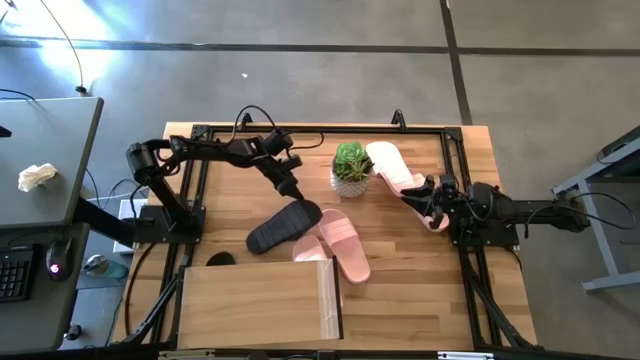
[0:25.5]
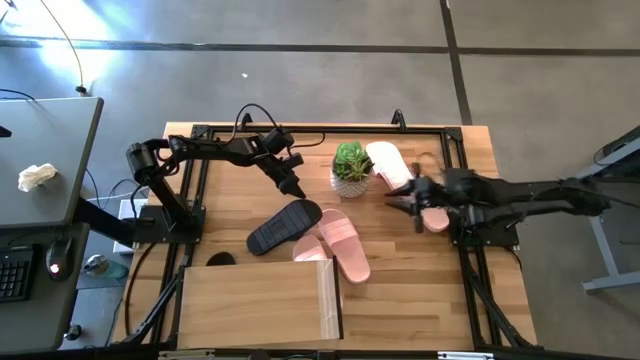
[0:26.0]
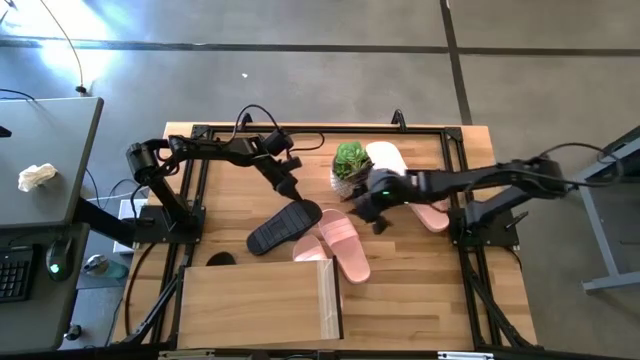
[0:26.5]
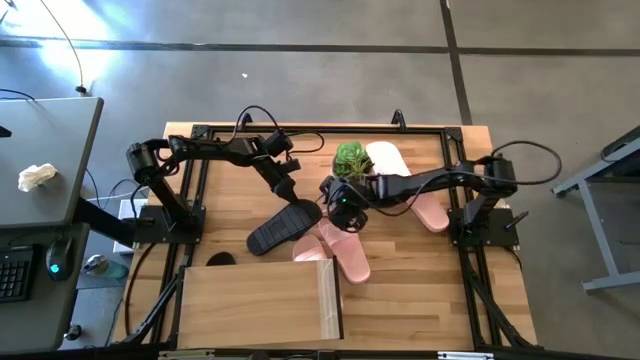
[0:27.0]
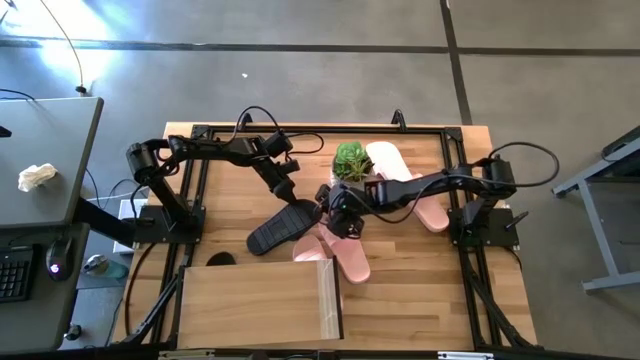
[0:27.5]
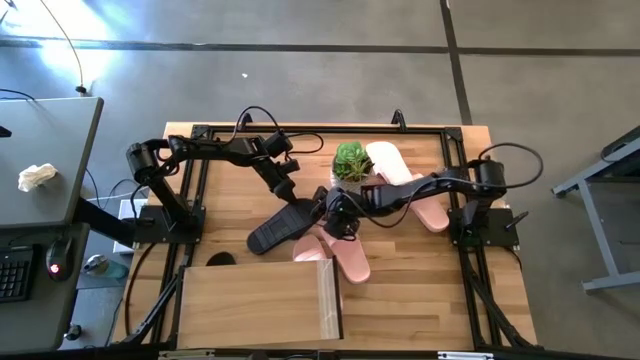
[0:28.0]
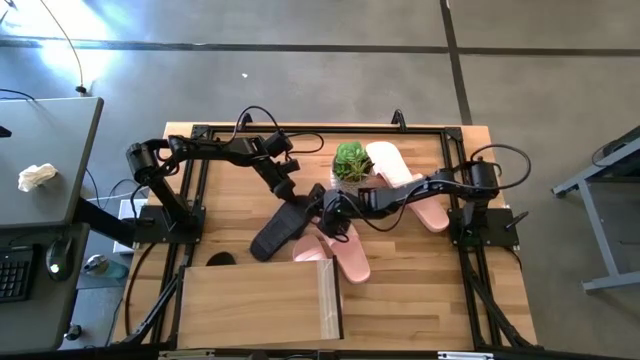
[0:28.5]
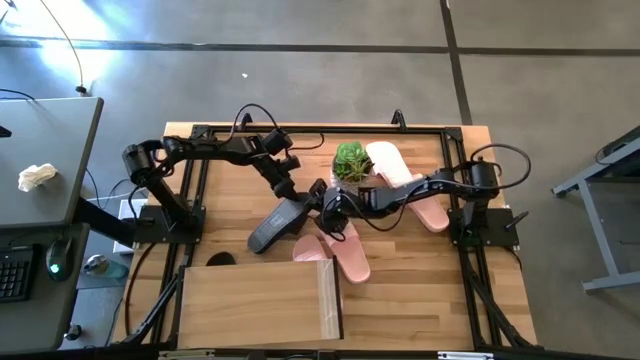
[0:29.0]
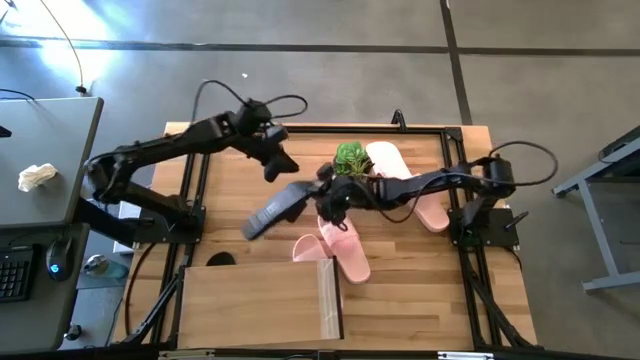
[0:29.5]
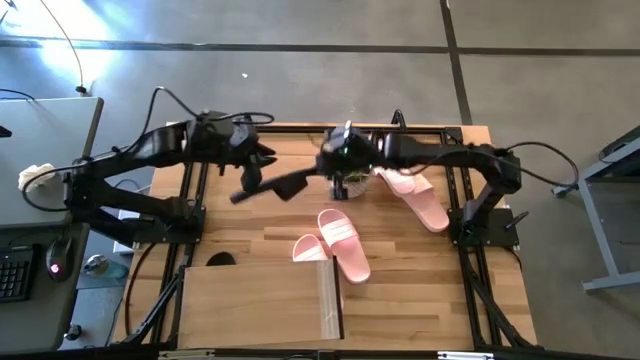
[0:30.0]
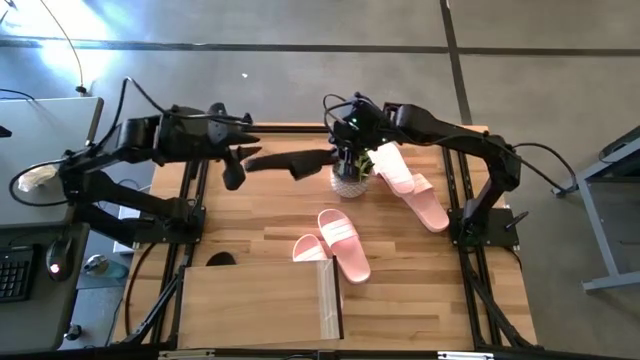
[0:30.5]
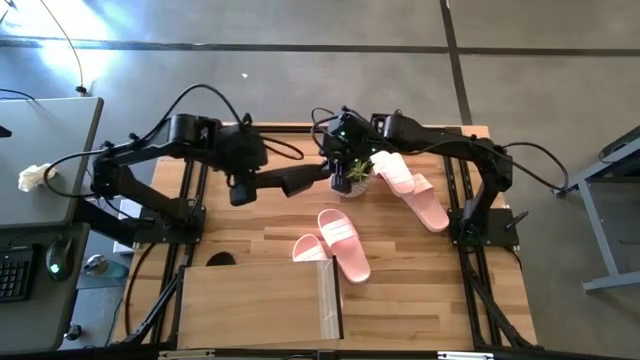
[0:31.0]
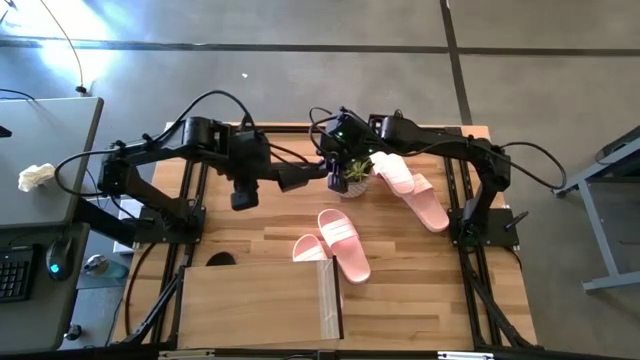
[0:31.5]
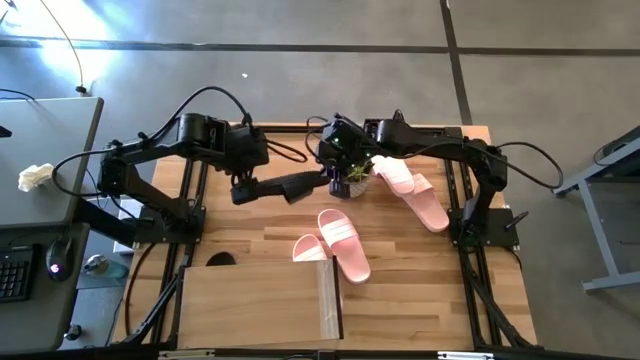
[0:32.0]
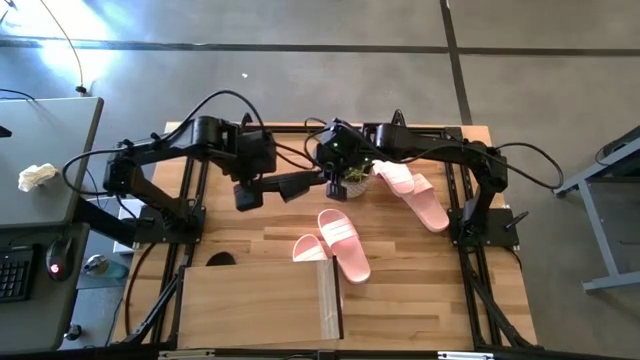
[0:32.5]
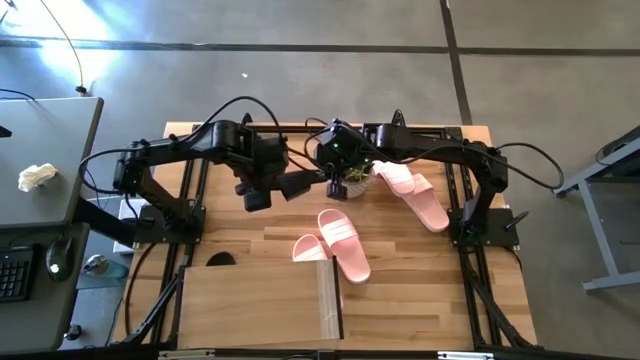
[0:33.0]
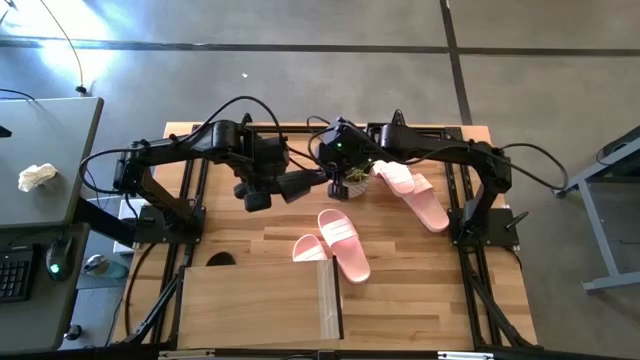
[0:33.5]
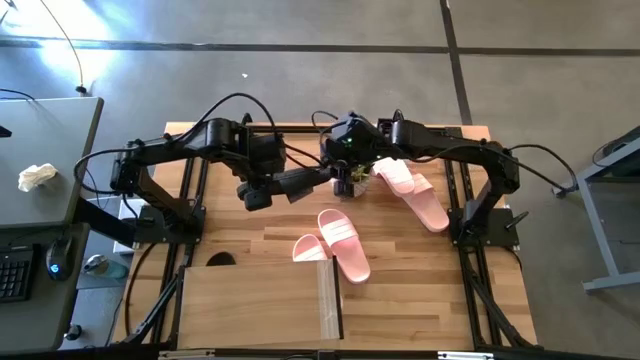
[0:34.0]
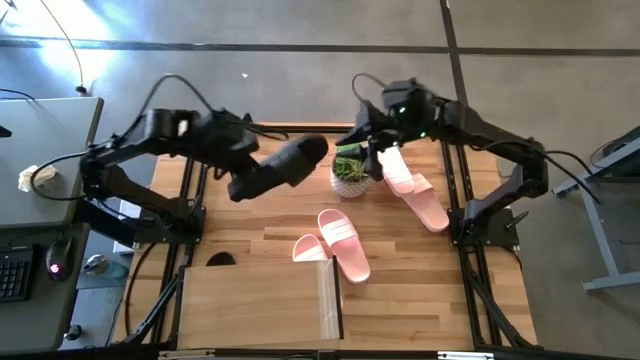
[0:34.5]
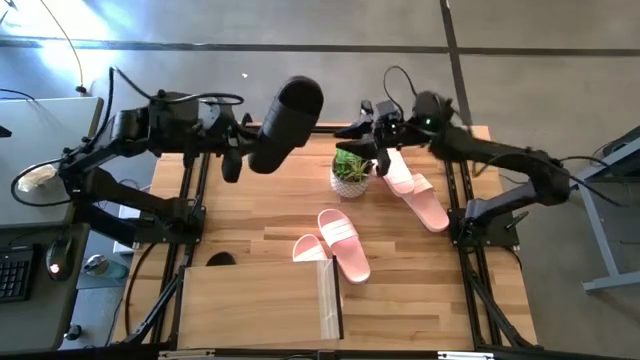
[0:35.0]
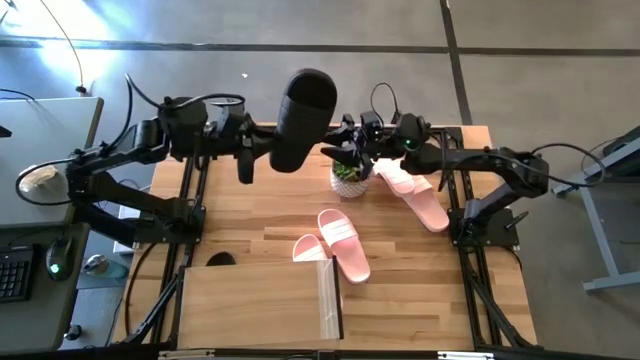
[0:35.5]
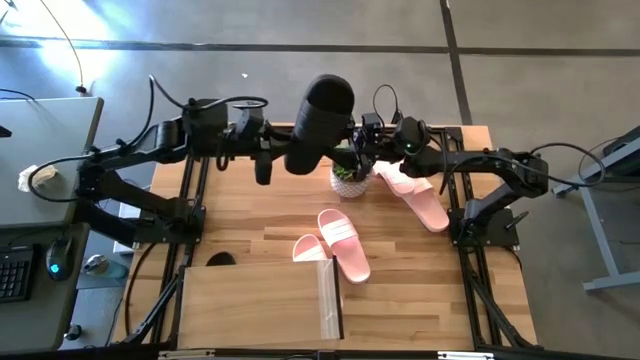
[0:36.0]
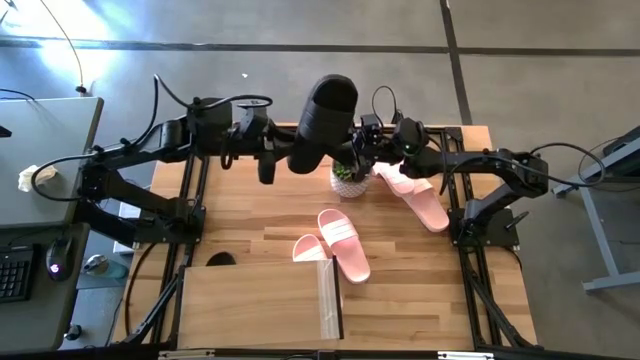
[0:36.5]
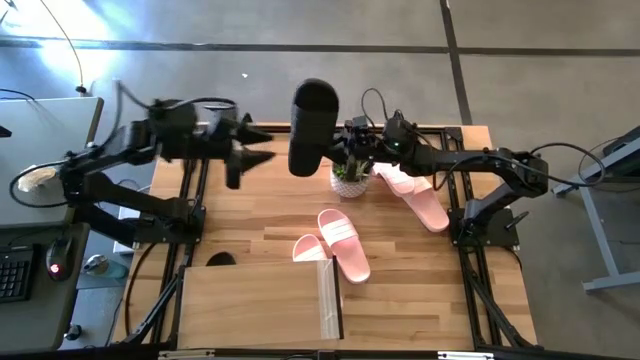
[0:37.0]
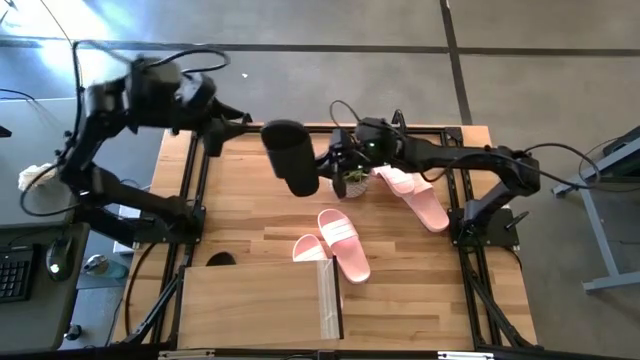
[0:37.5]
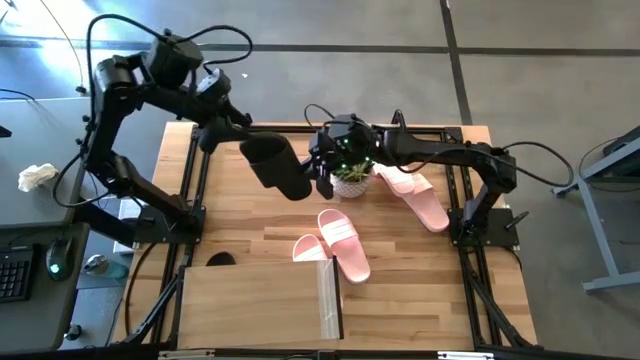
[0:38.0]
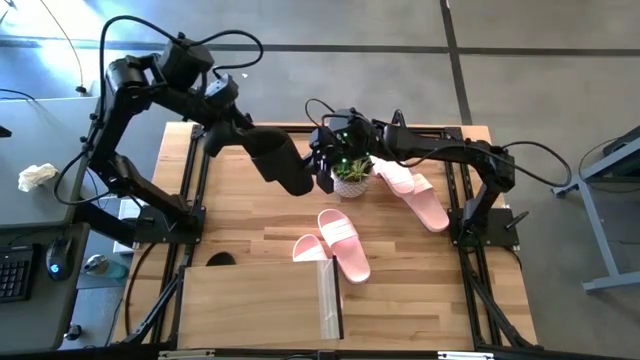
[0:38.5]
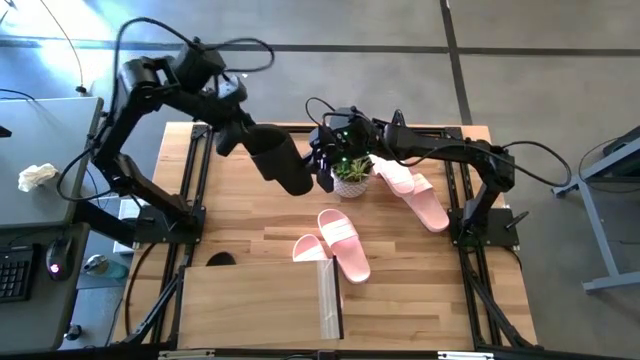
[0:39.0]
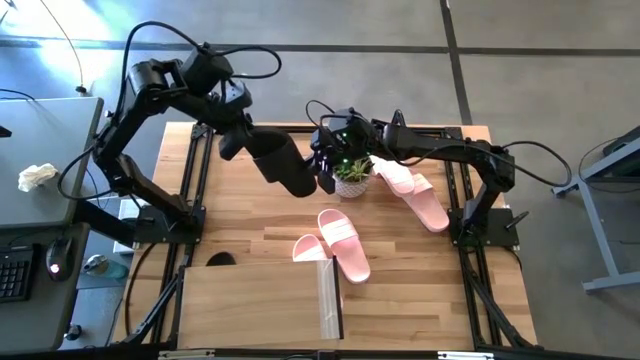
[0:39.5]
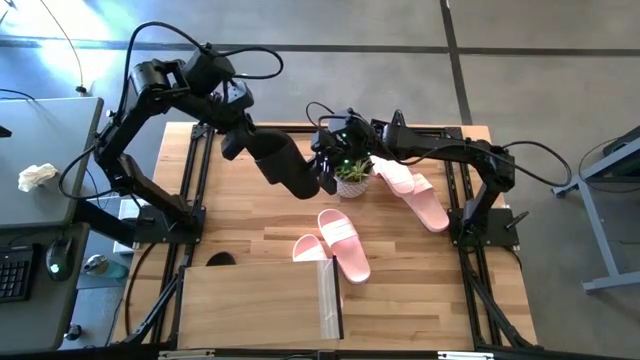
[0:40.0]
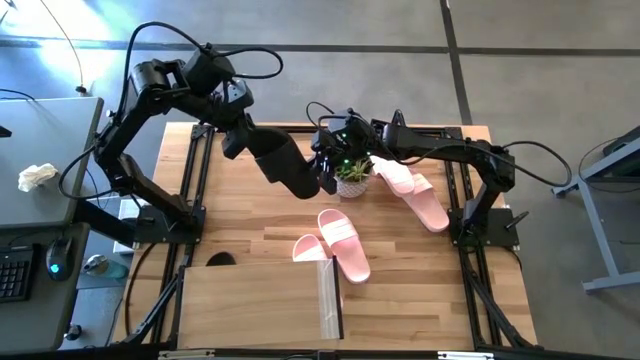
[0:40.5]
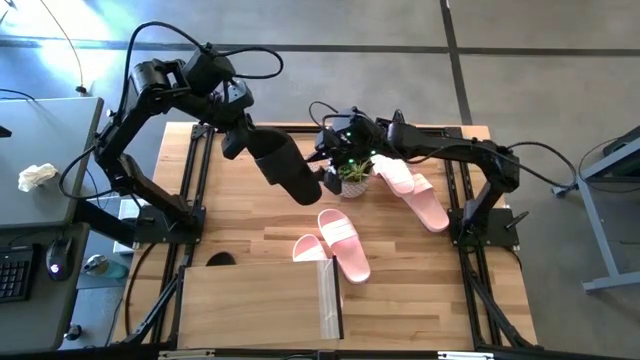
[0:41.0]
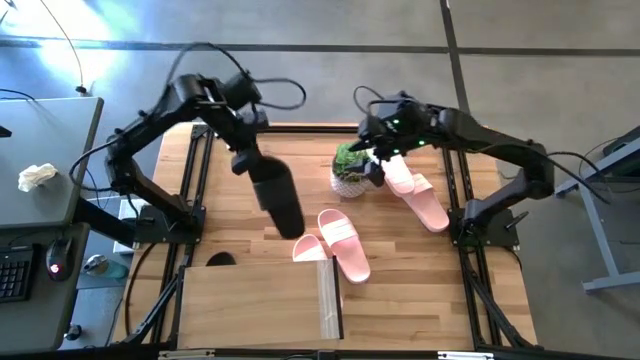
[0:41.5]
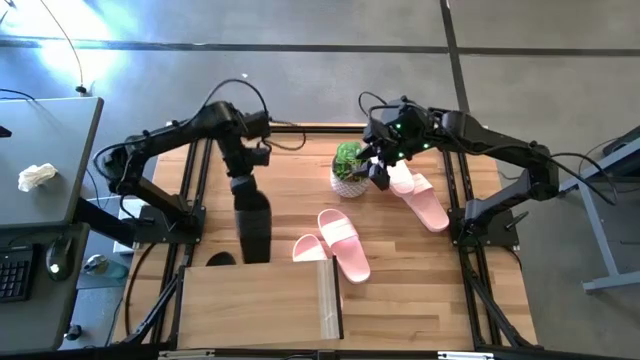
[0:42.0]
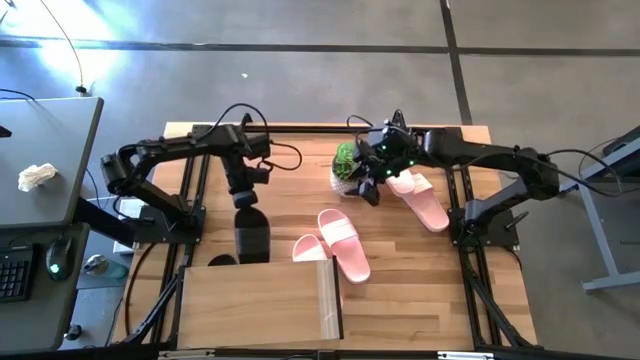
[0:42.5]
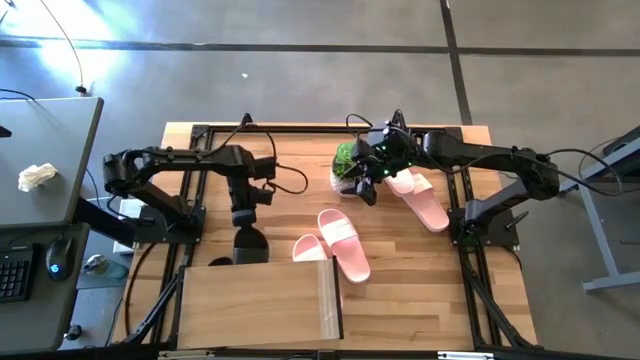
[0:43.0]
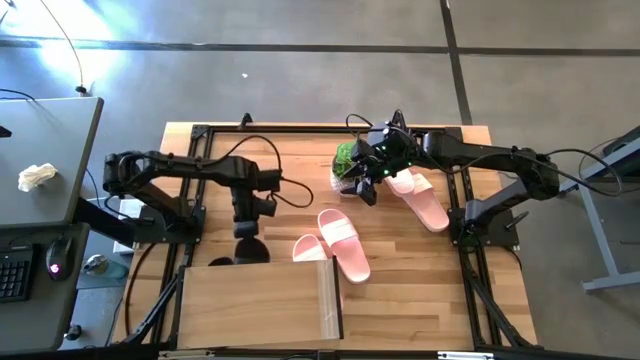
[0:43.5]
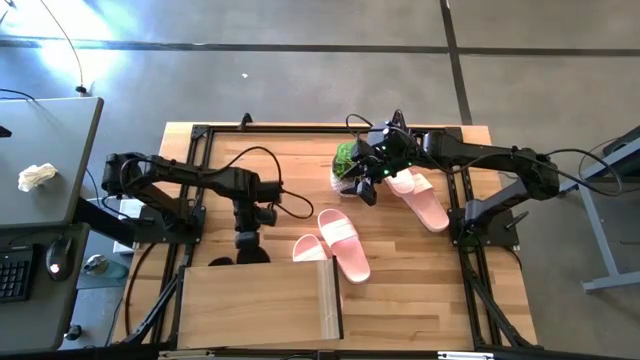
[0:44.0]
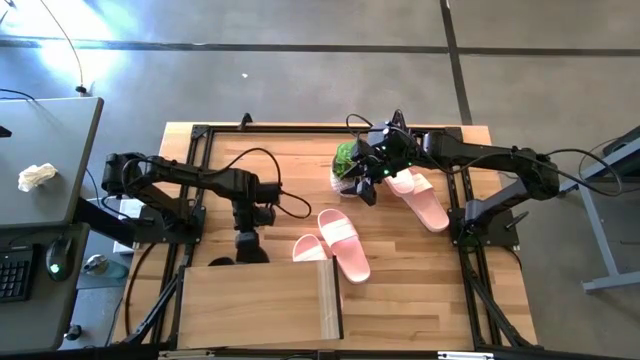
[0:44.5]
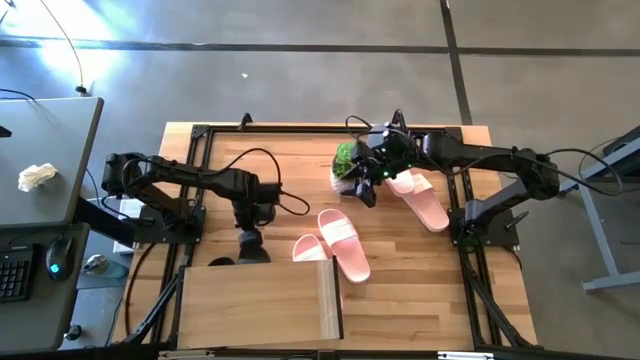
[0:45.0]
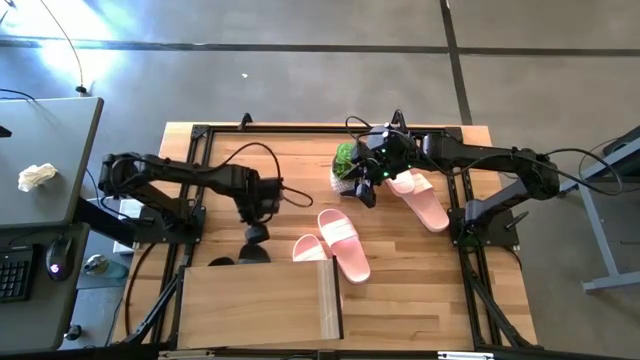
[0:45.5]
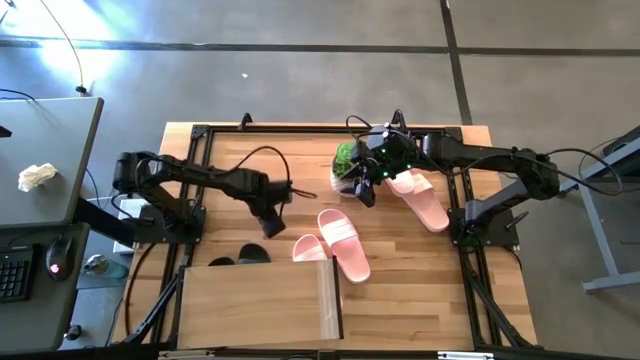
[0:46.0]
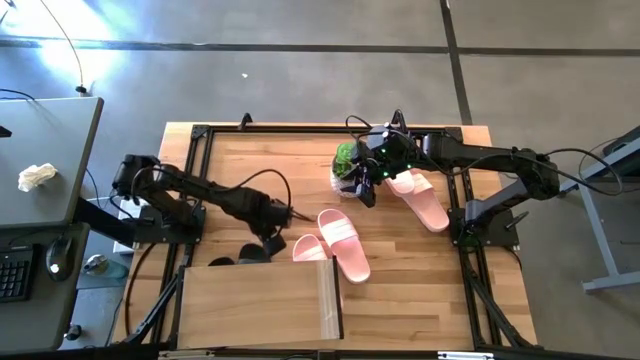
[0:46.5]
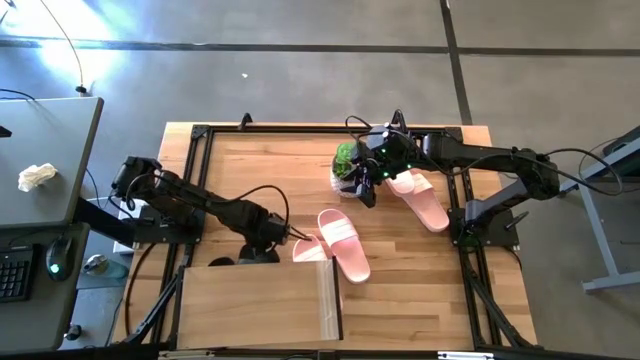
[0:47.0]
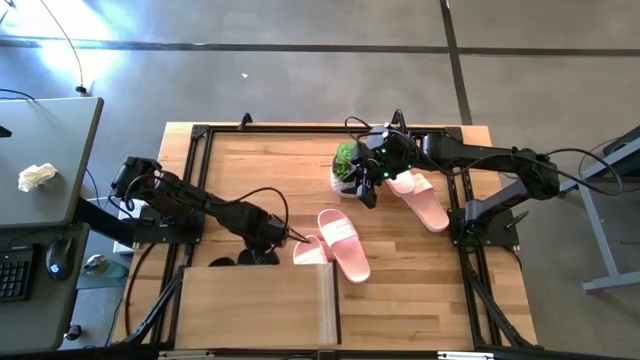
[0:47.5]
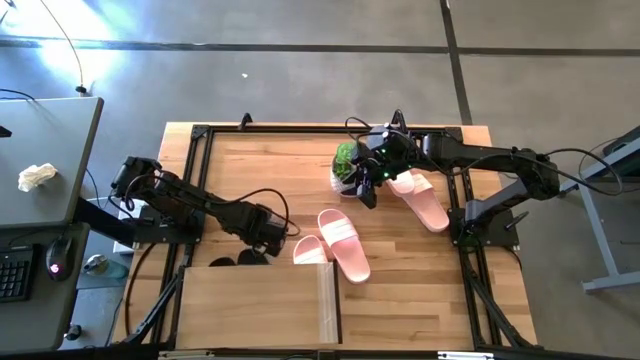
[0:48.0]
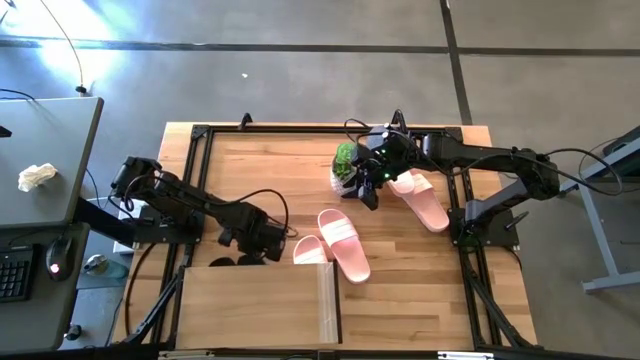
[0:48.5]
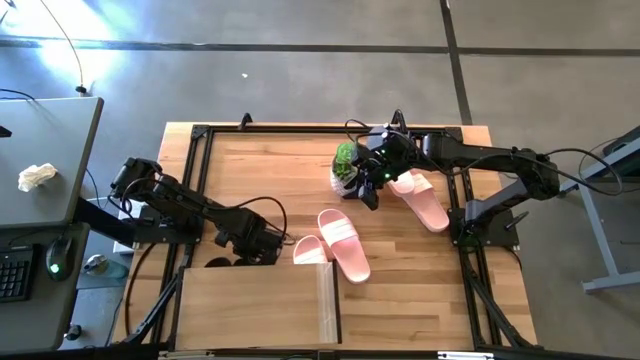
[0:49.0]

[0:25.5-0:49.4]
Task: Pick and place slides into the shelf
Put the black slide under the shelf
